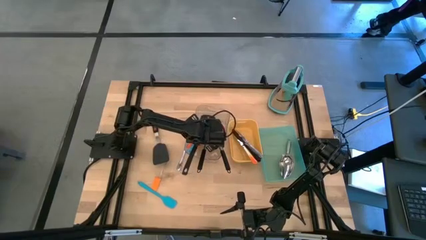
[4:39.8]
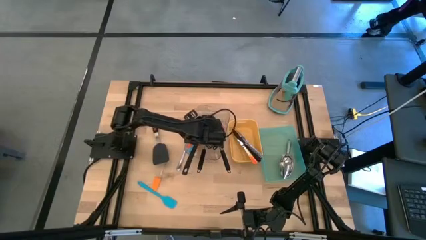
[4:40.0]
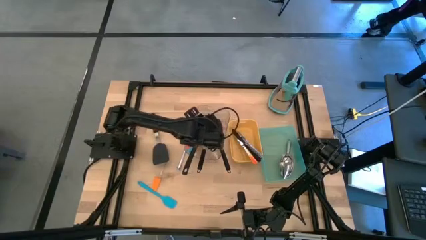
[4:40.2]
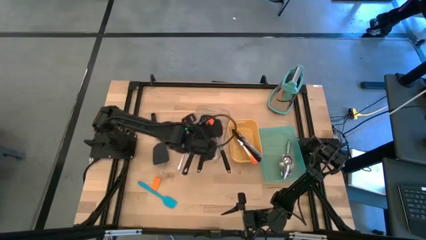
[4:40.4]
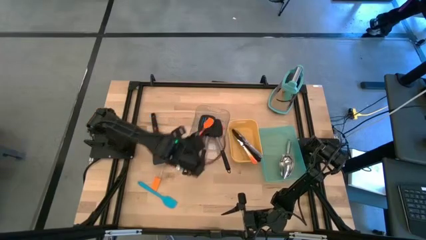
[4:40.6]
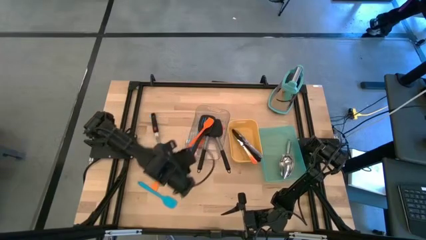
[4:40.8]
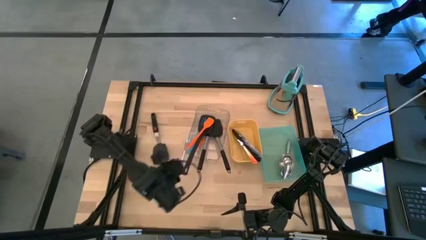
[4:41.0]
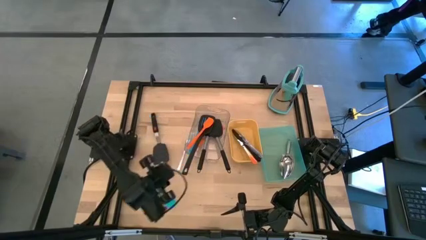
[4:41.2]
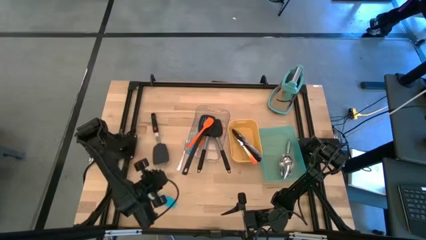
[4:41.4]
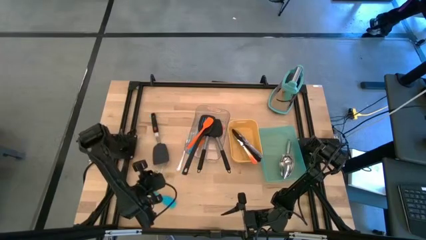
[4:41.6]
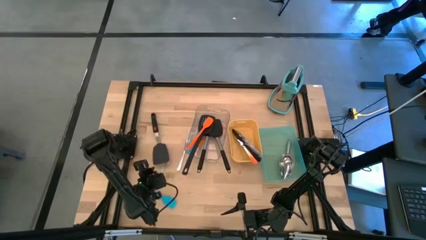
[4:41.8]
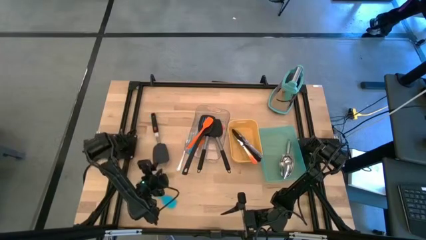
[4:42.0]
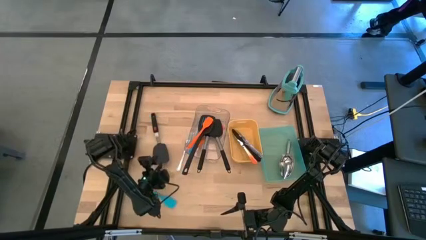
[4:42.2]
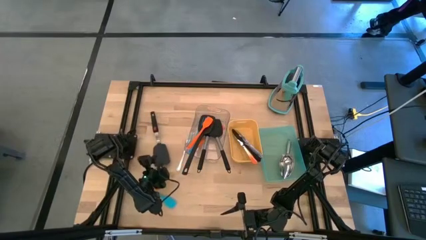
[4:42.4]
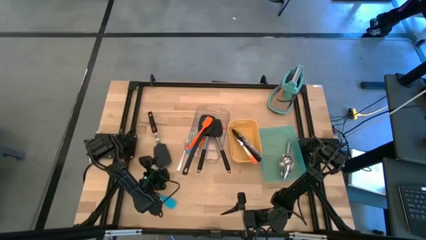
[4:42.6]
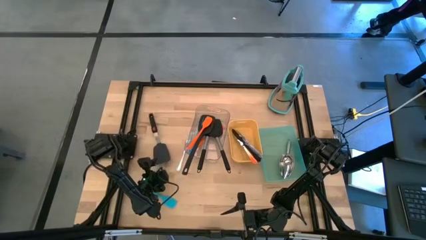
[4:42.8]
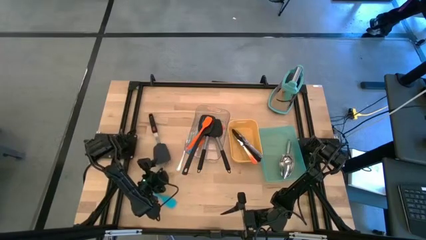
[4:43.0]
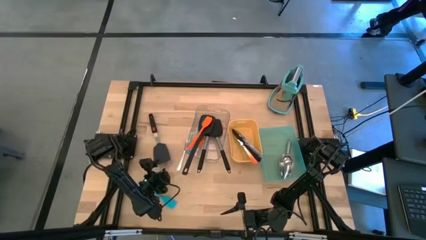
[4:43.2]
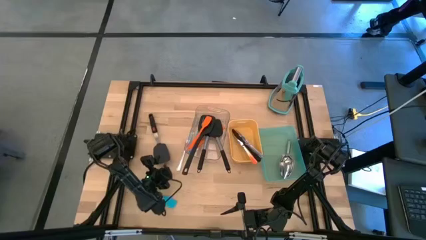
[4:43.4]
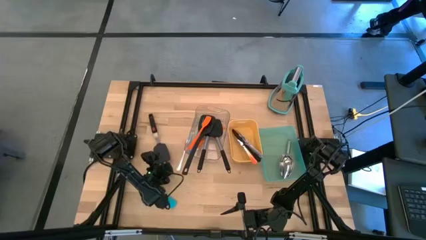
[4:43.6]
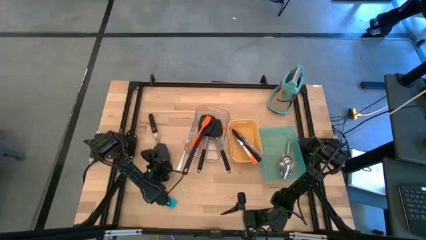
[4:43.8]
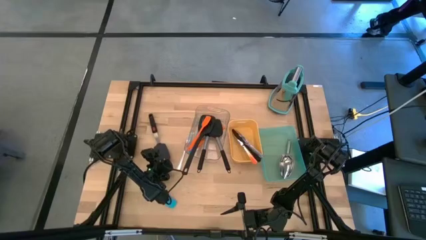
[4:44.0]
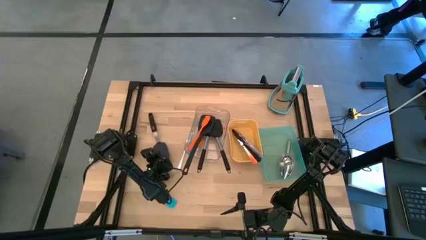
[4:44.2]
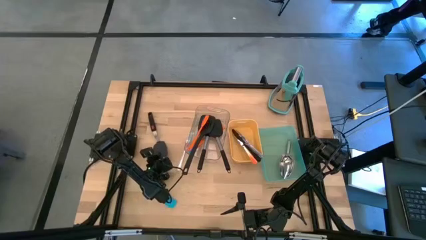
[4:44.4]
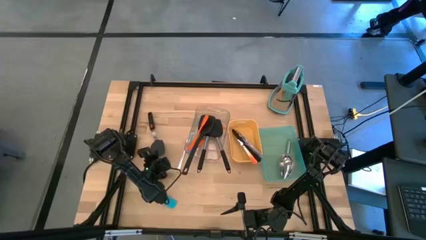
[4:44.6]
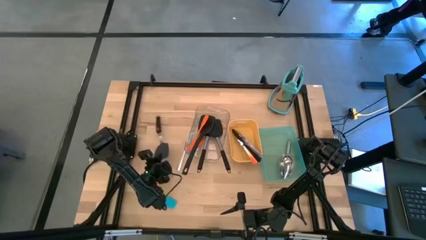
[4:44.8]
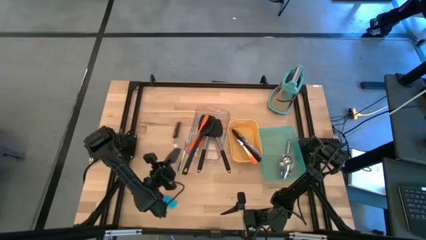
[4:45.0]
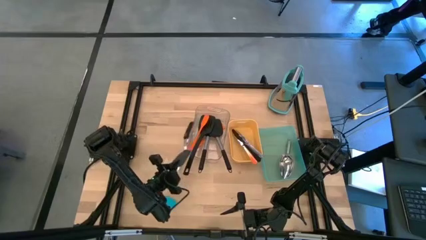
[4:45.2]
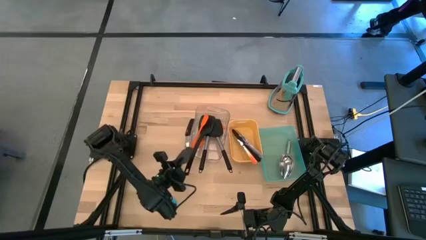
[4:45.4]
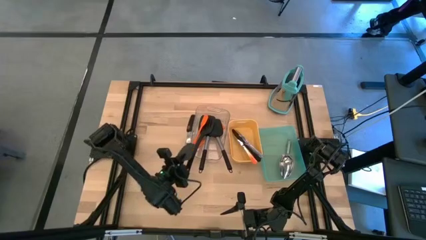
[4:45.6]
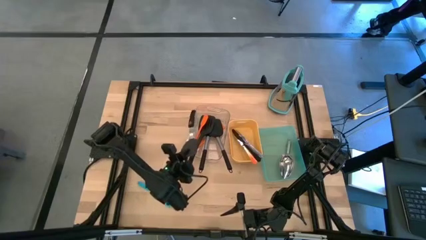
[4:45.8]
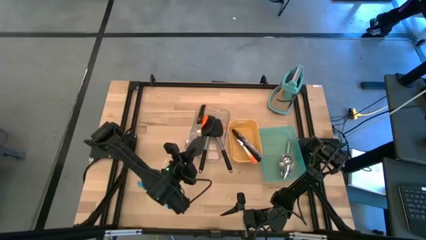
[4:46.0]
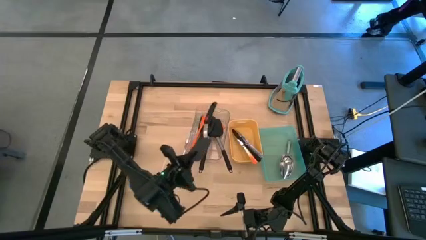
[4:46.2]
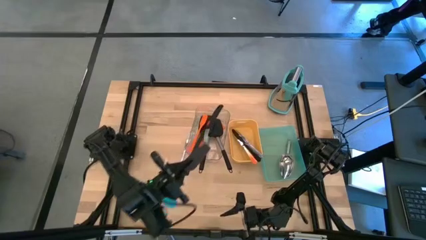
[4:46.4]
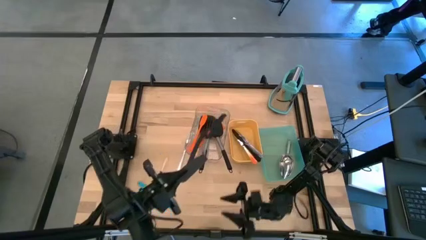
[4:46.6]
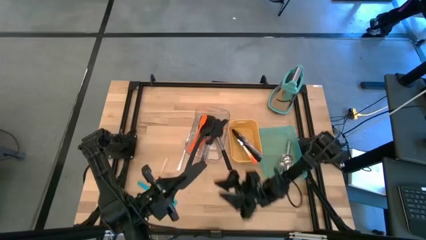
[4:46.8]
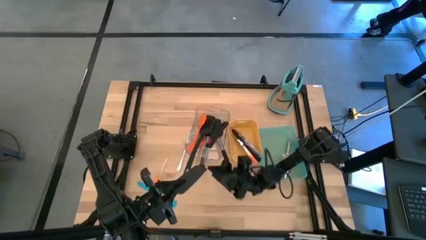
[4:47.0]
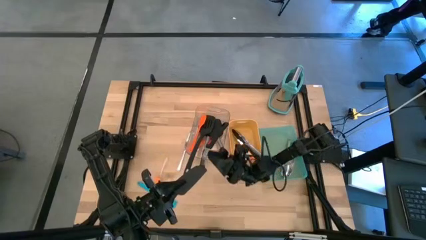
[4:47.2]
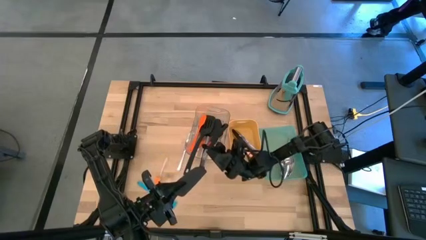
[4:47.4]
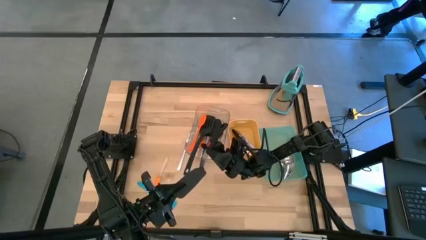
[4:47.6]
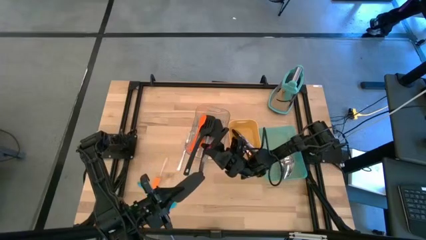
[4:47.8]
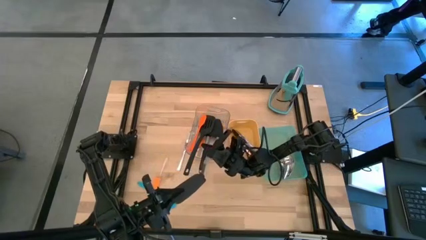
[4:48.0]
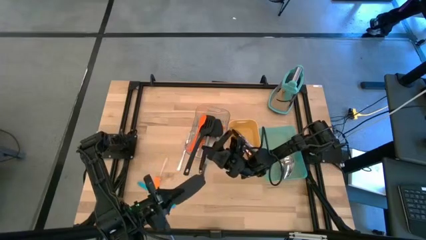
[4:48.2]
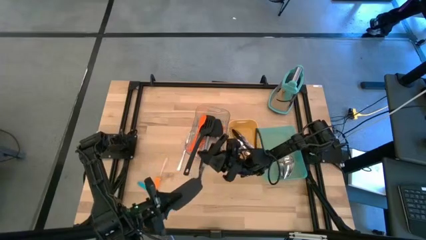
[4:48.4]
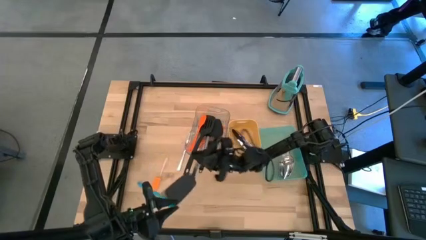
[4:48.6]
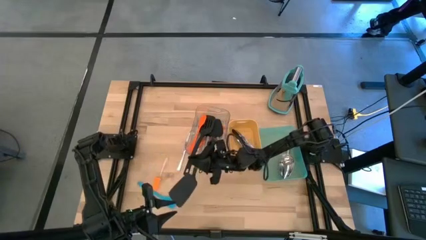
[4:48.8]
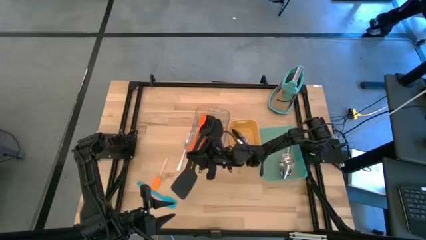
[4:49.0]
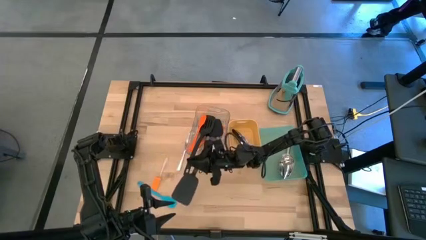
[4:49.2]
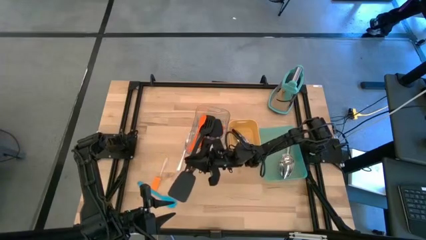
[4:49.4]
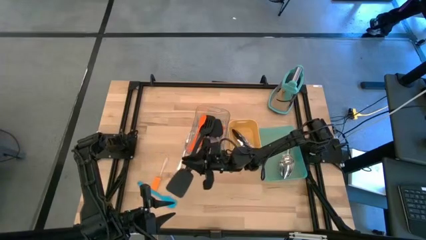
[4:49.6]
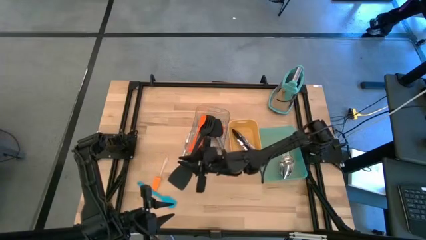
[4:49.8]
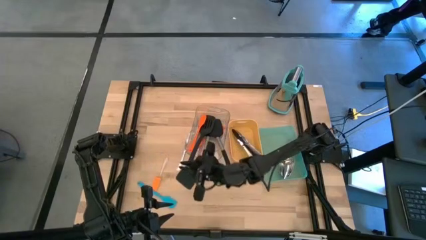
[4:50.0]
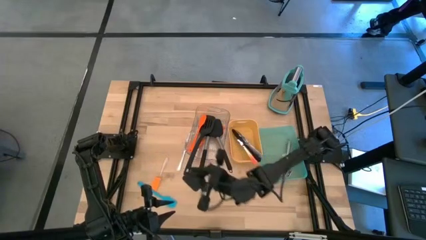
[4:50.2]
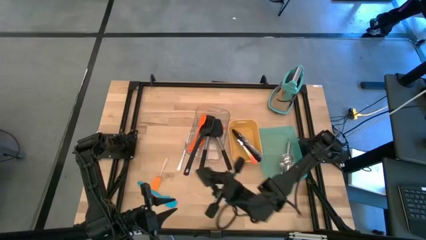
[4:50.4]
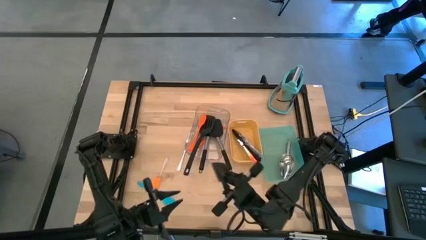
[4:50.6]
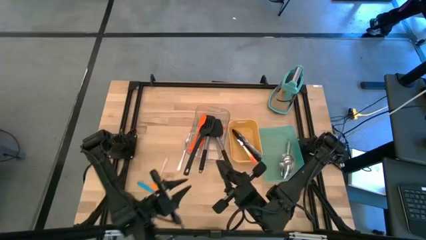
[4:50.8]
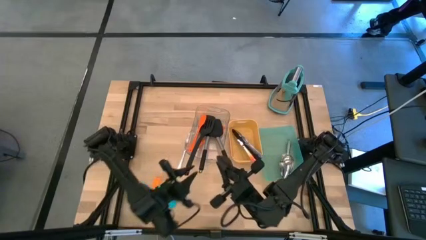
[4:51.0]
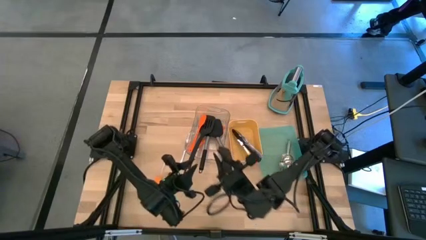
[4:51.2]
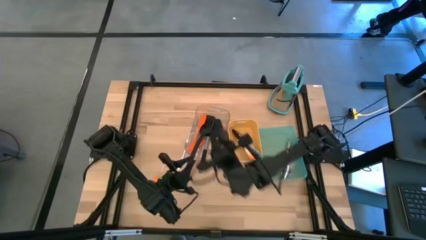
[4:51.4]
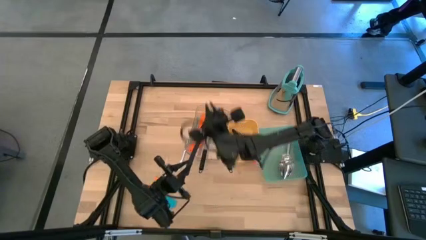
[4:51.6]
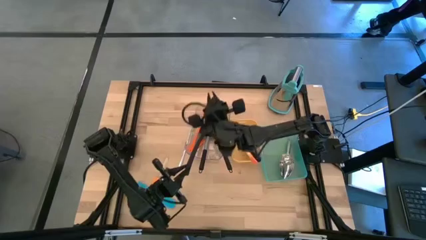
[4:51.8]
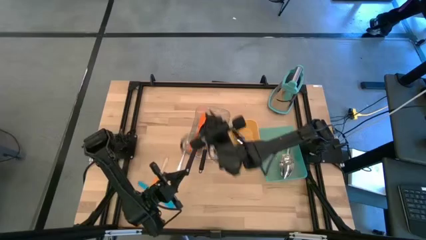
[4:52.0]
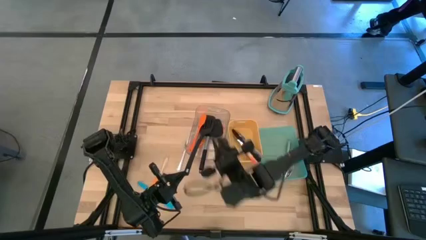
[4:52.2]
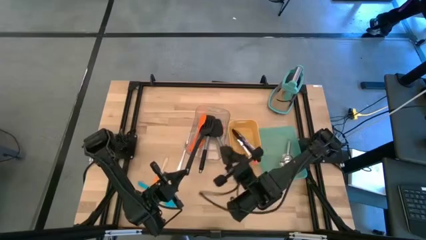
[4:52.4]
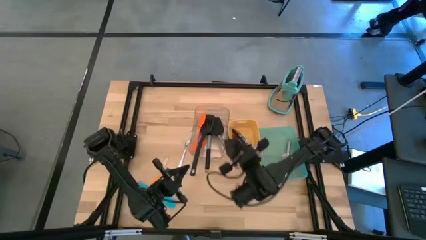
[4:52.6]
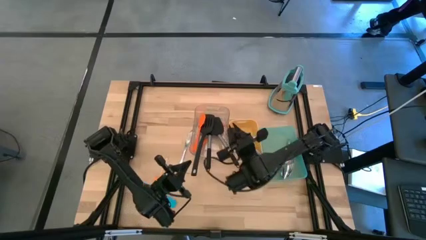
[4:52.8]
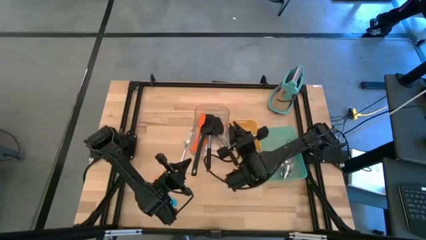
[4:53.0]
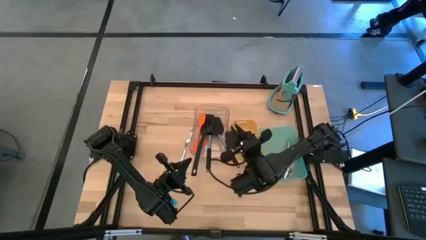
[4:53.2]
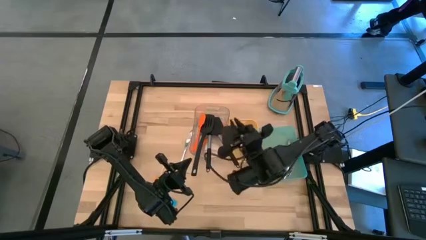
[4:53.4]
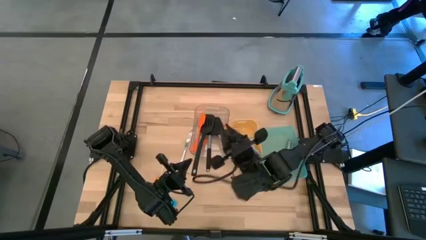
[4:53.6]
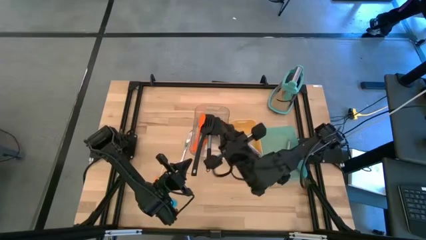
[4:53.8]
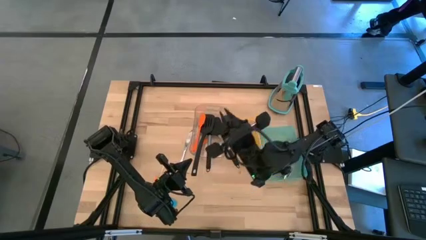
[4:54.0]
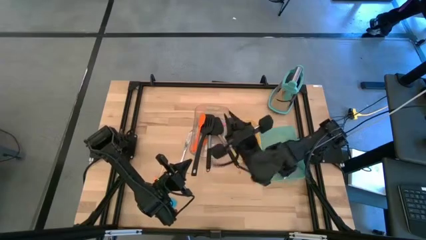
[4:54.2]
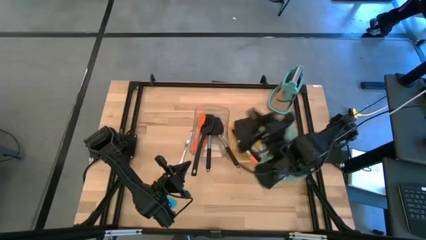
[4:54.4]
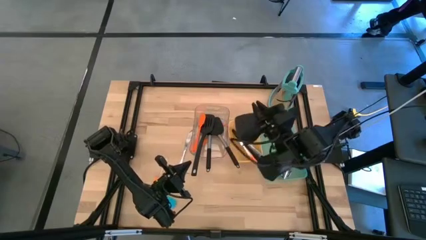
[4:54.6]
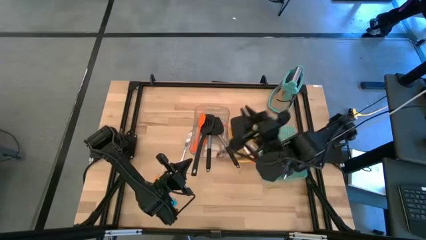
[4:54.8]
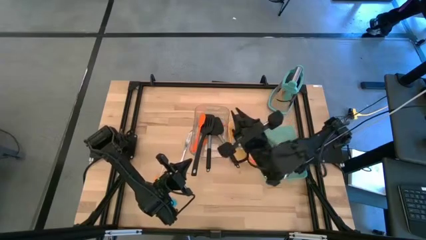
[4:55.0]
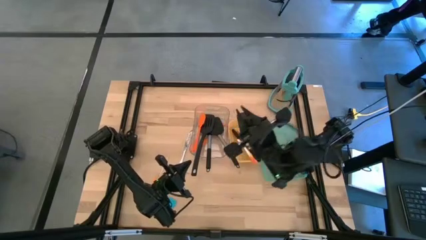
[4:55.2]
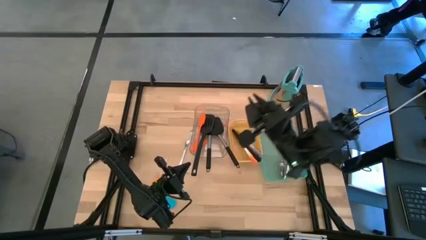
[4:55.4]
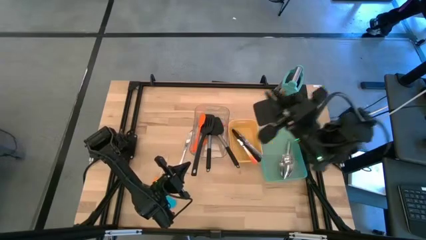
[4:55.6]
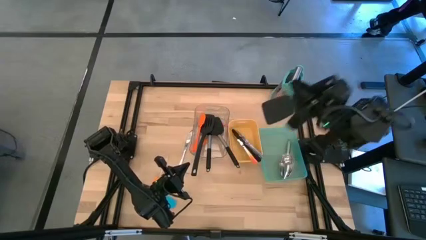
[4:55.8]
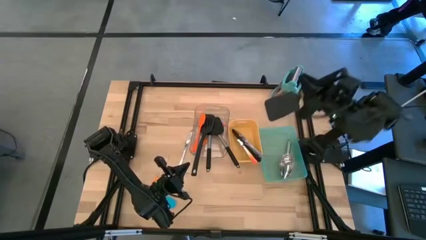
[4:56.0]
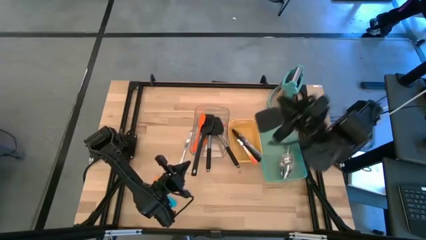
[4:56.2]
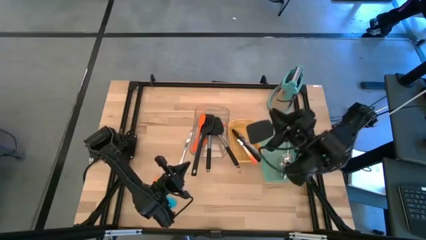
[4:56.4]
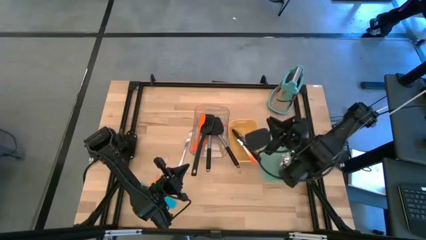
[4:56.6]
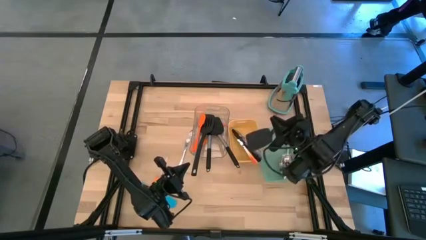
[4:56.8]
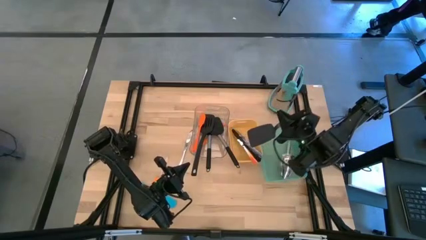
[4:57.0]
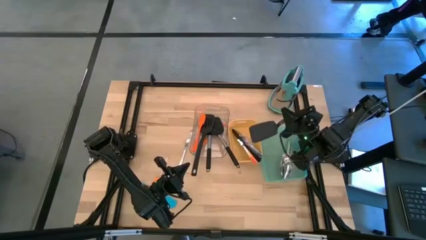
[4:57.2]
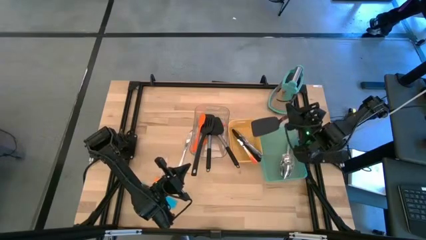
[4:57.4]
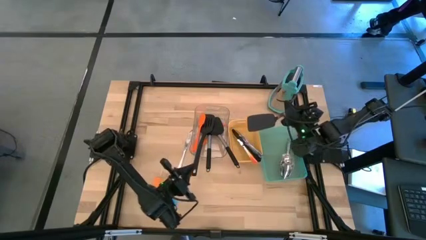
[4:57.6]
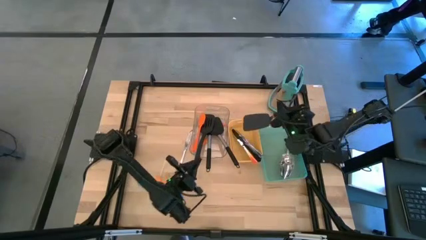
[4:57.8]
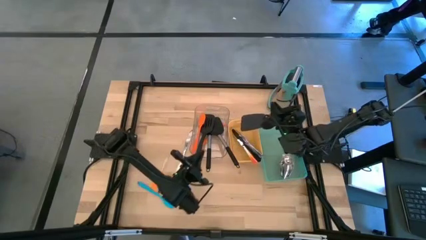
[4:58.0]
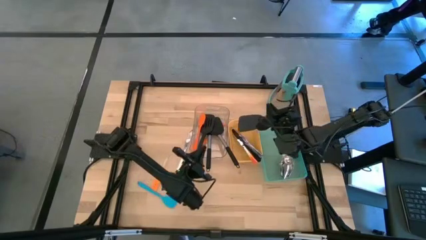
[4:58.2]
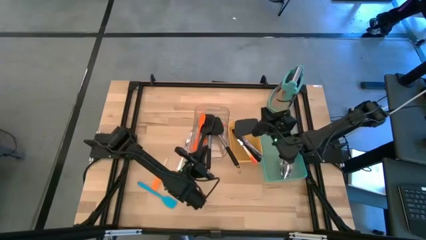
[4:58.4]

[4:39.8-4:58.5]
Task: Pick & Place Kitchen Items
Put the black spatula into the transparent bin
